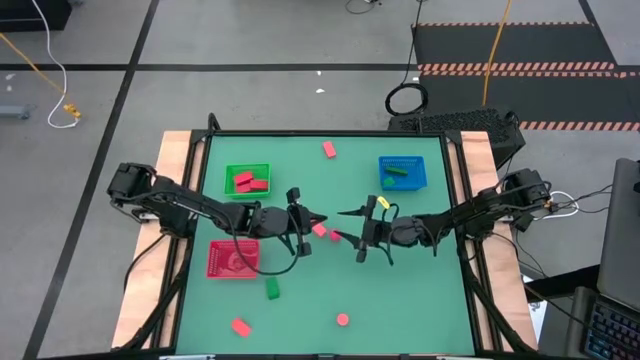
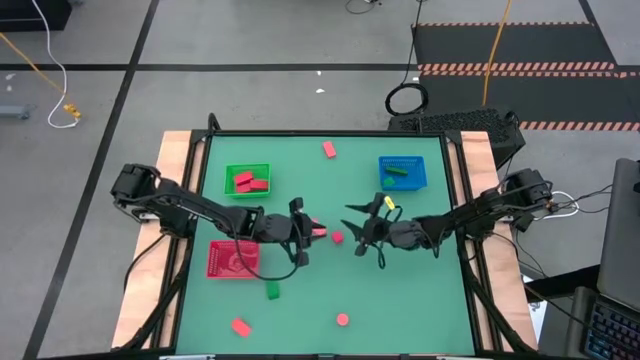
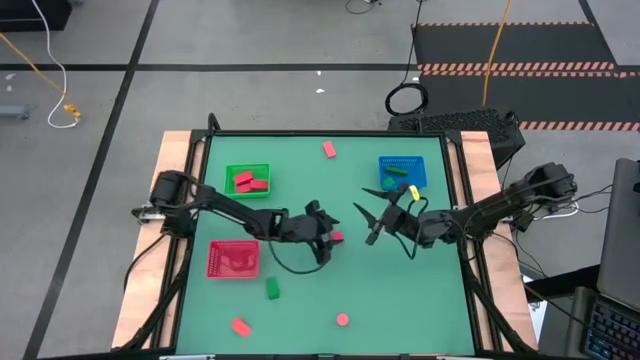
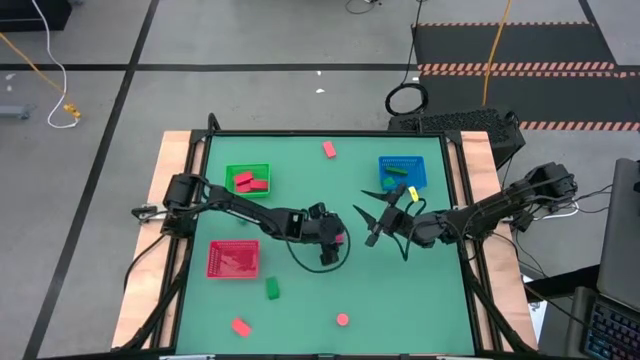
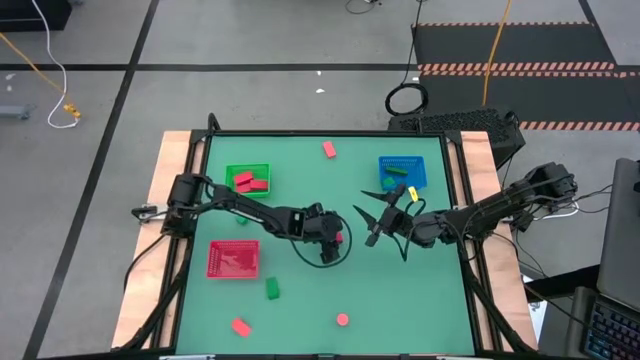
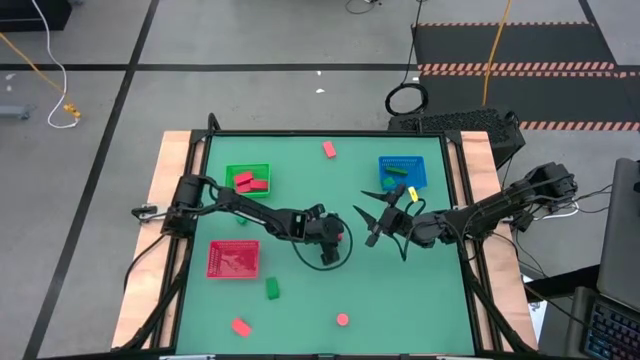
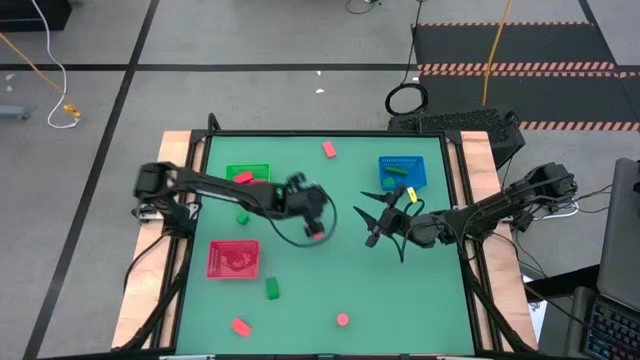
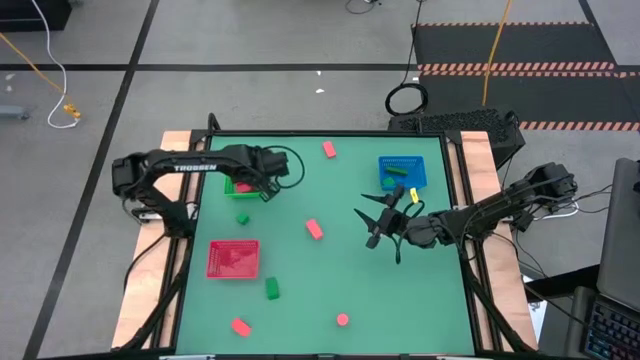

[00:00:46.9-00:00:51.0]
Task: Sort & place blocks by color
Put the red block into the green bin

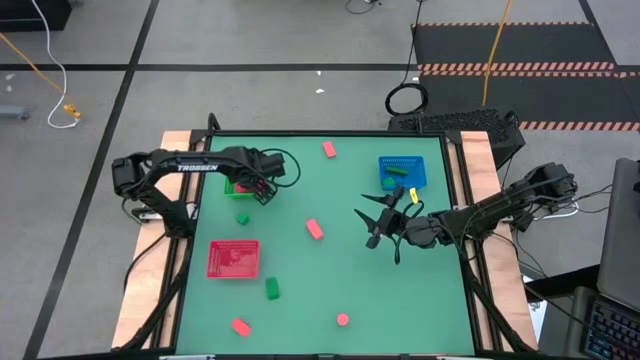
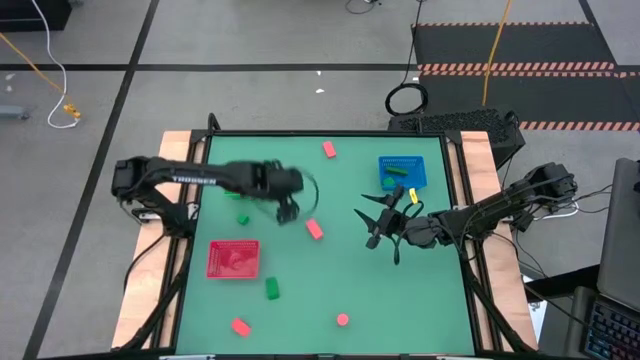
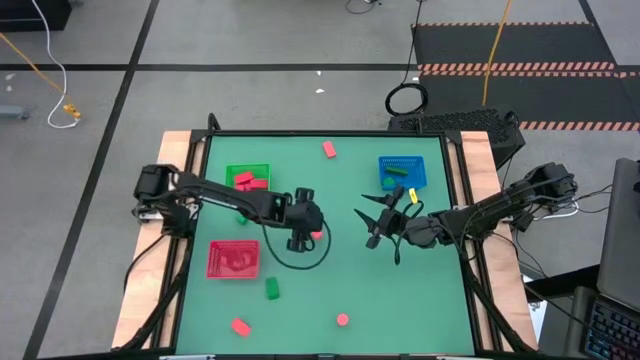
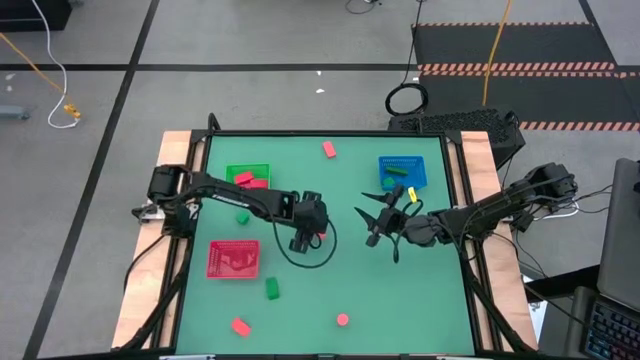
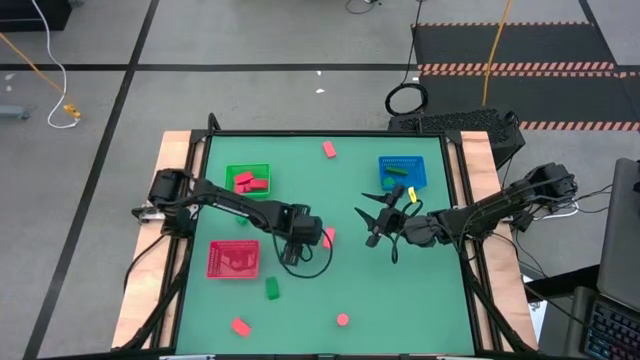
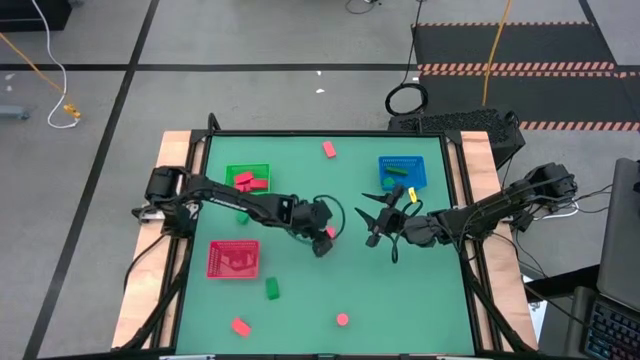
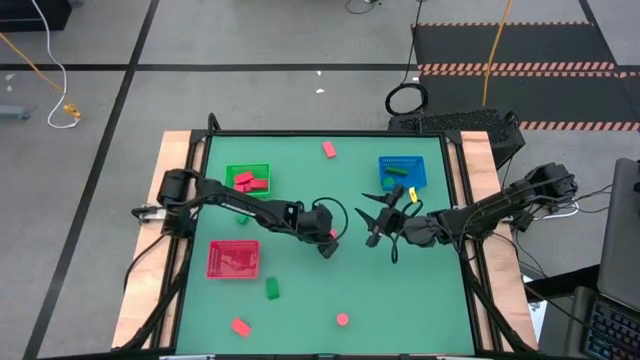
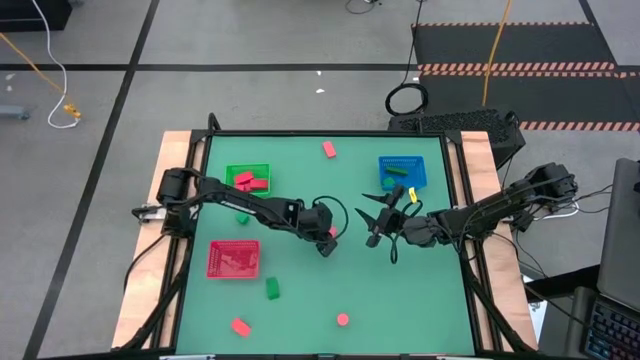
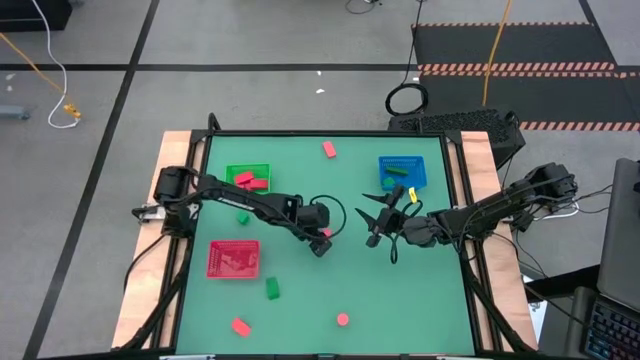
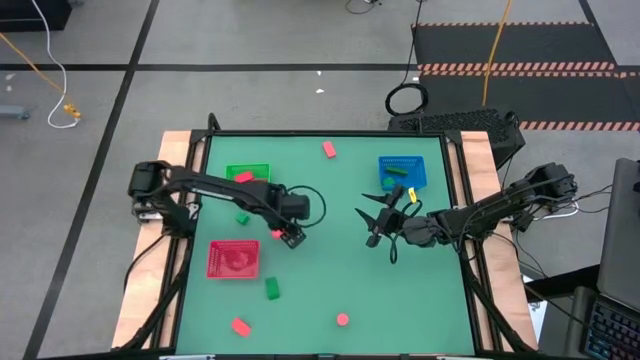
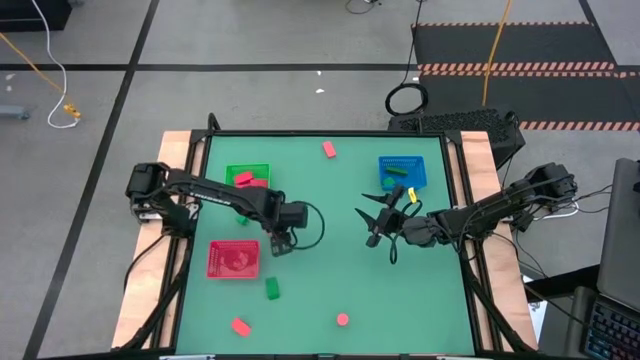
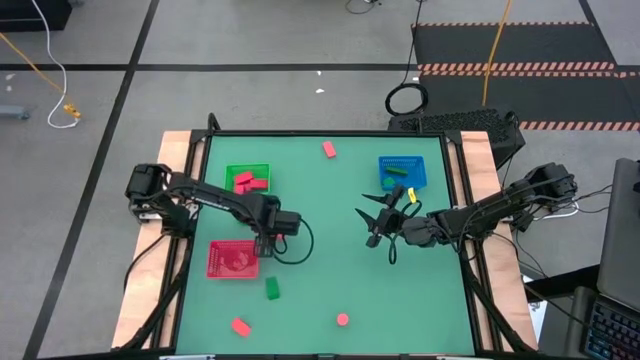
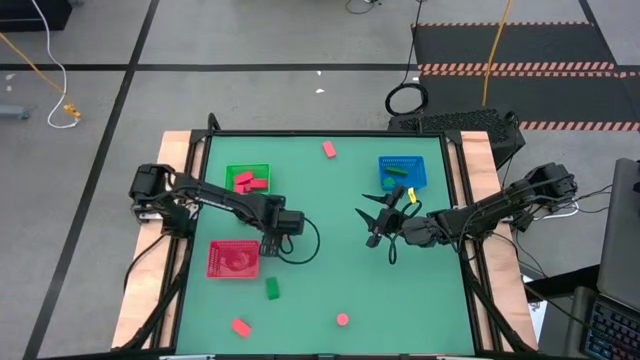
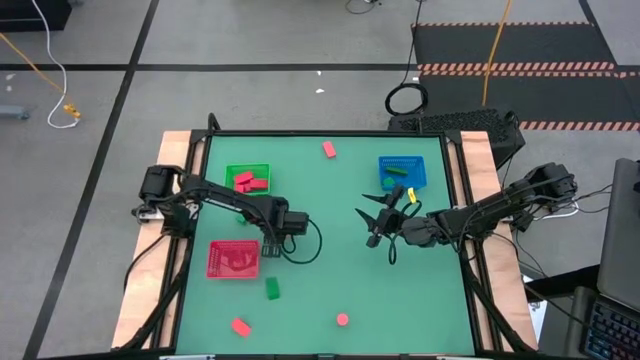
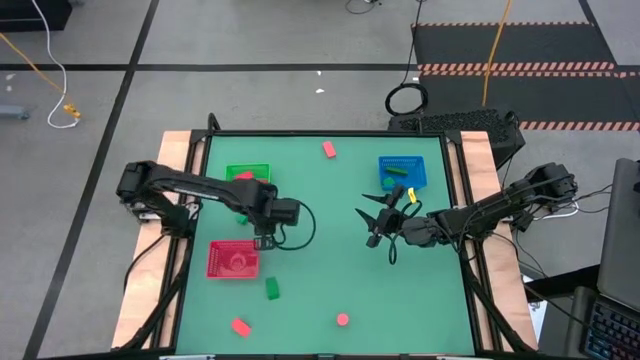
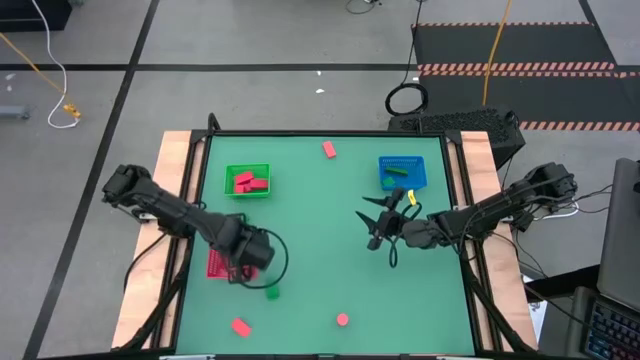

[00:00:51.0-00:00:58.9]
Put the orange block into the red bin

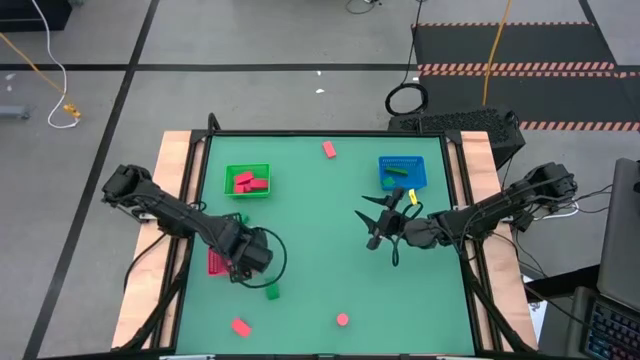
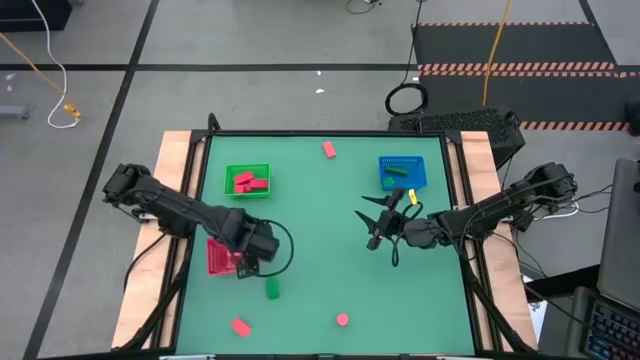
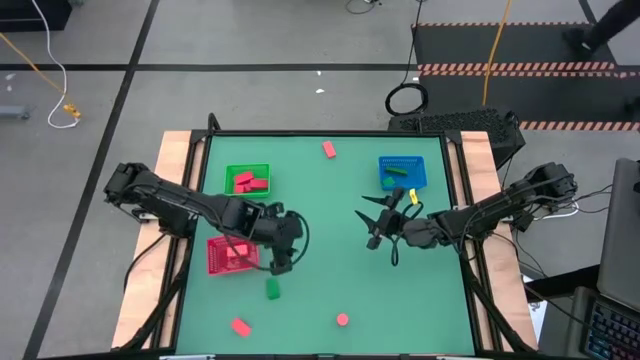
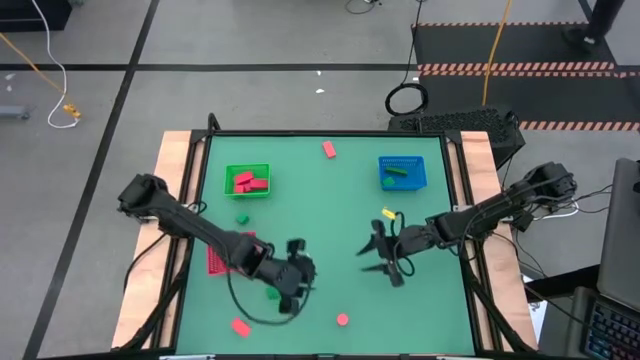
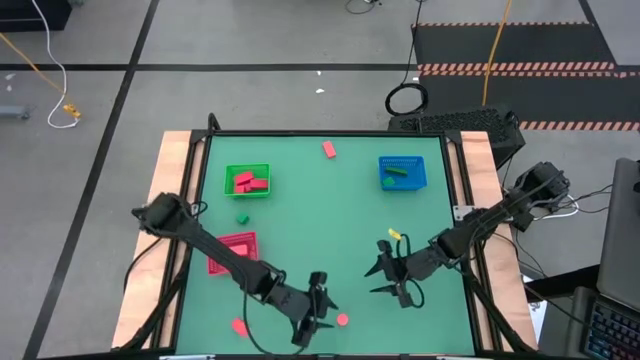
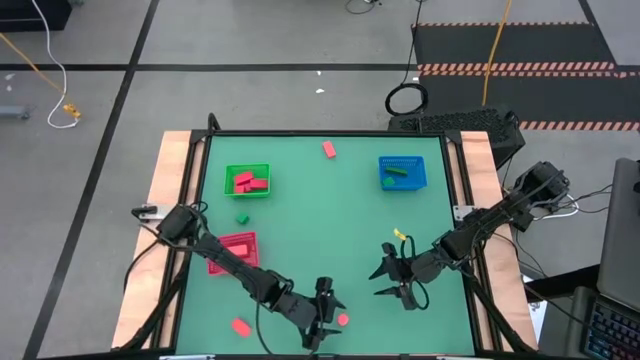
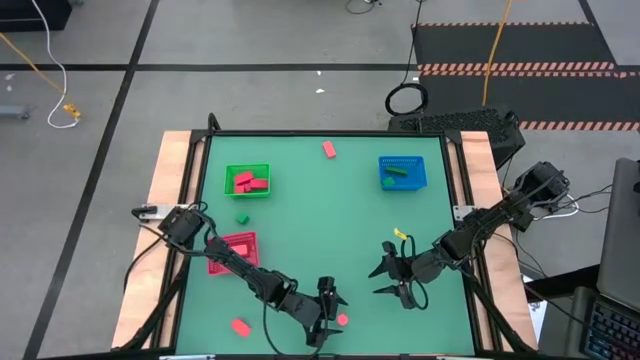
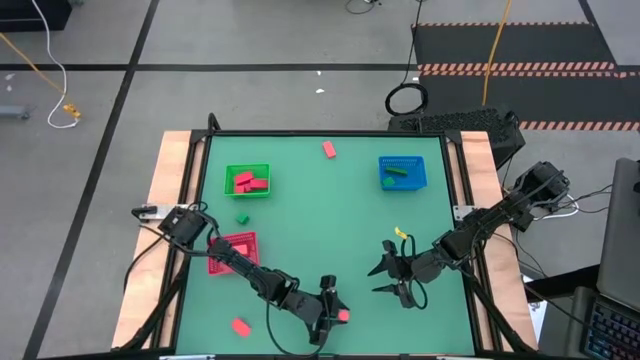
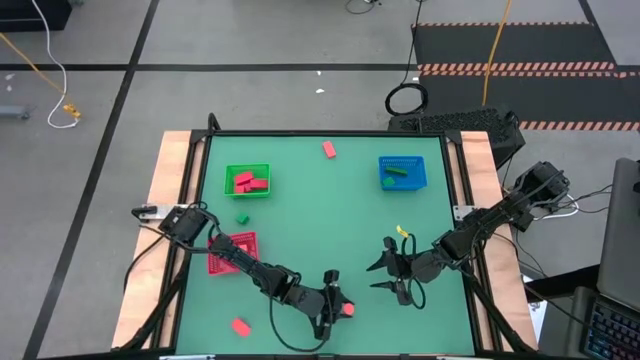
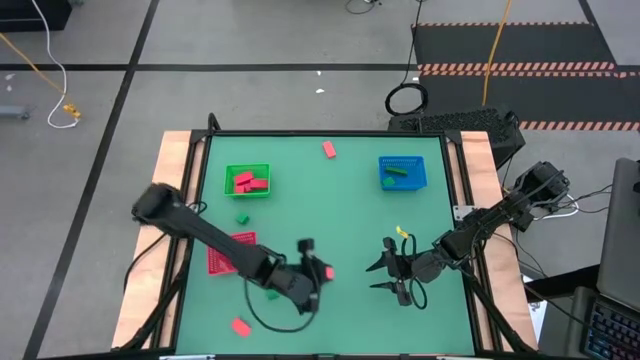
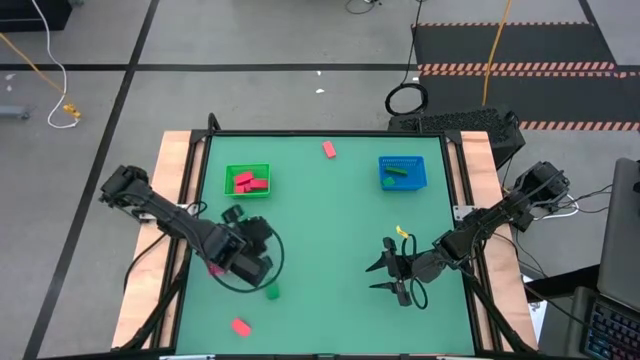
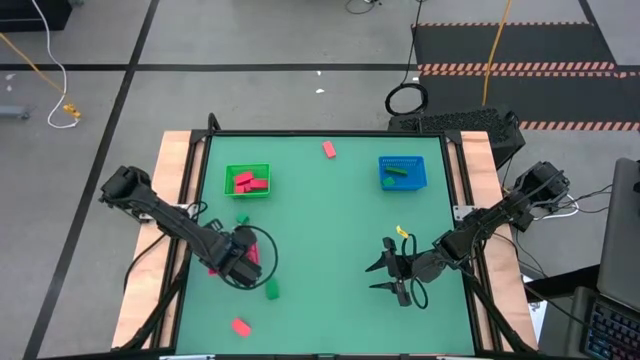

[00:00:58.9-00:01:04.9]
Put the orange block into the red bin

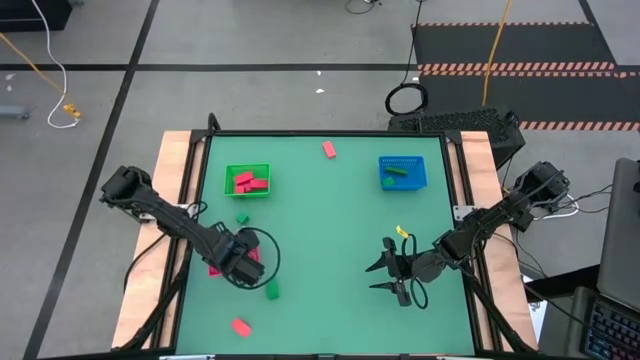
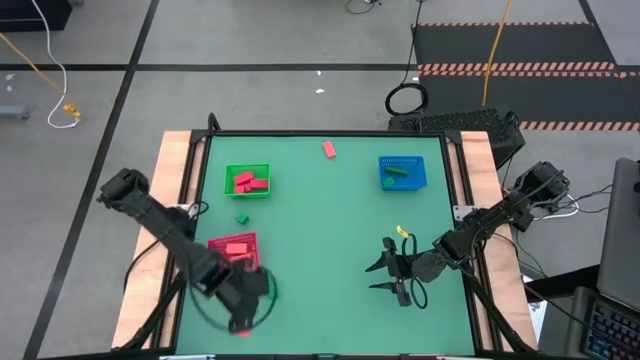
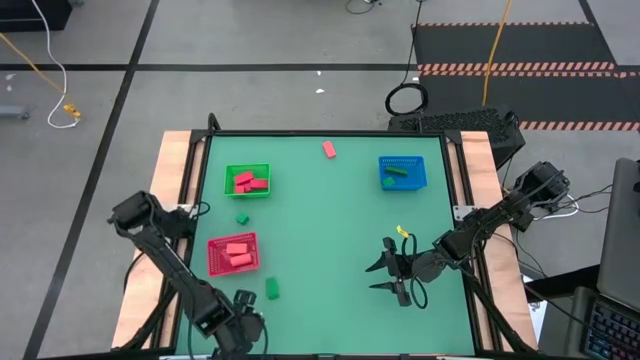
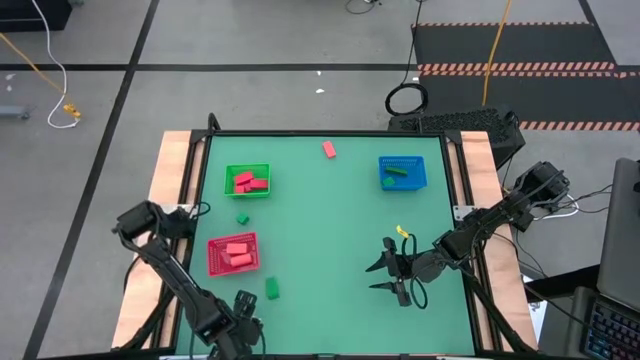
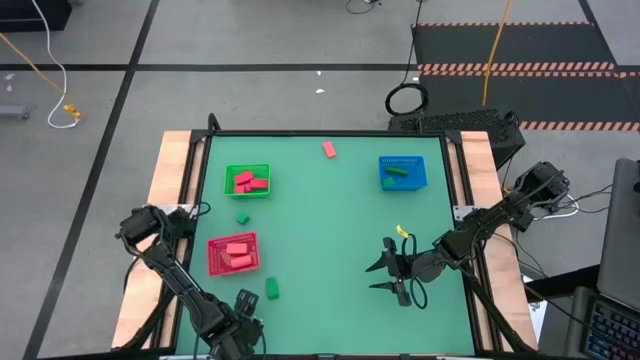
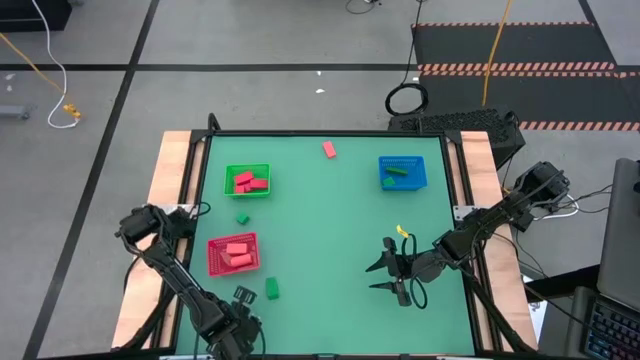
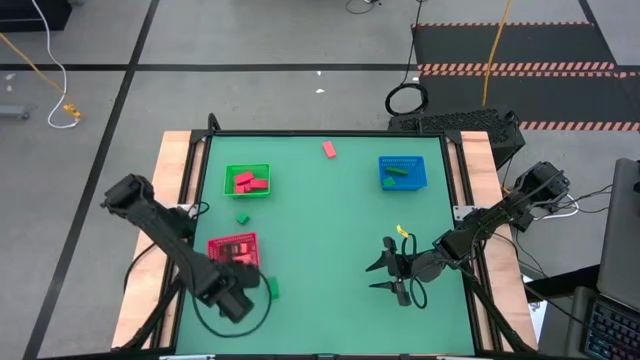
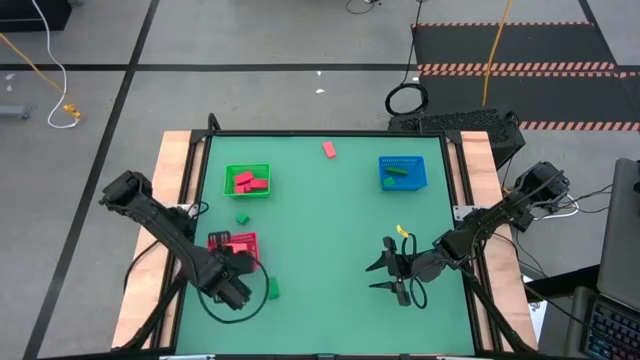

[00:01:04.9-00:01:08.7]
Put the orange block into the red bin
